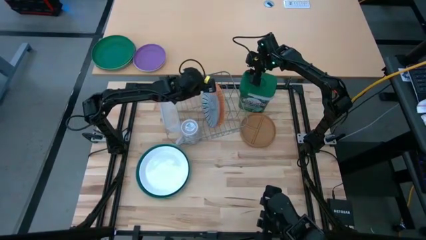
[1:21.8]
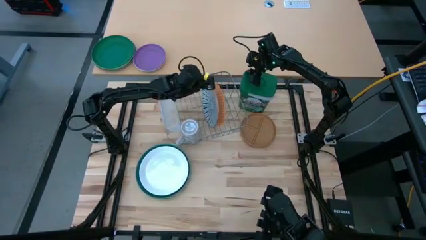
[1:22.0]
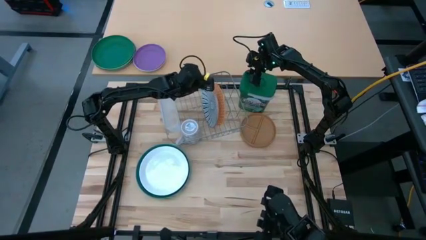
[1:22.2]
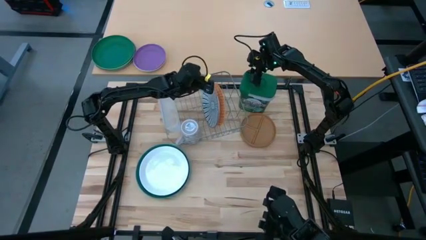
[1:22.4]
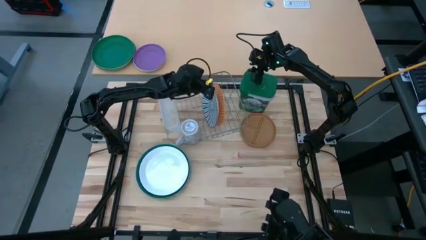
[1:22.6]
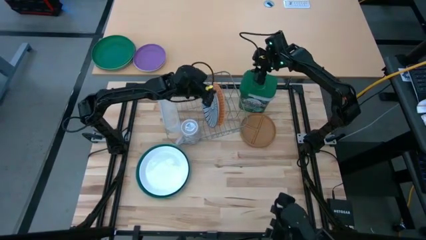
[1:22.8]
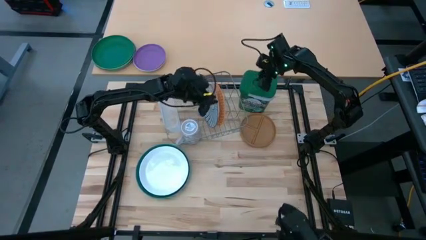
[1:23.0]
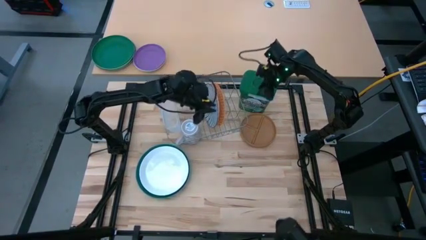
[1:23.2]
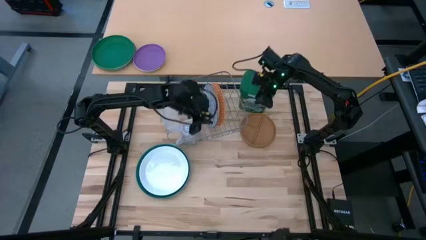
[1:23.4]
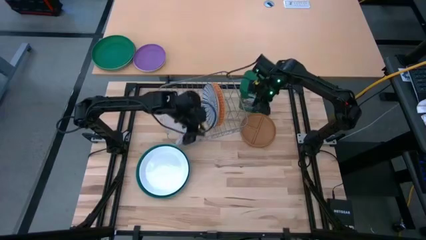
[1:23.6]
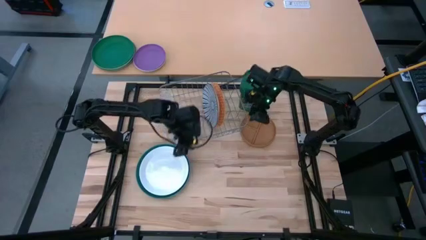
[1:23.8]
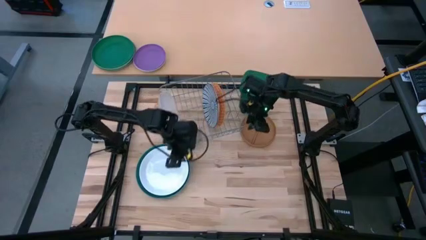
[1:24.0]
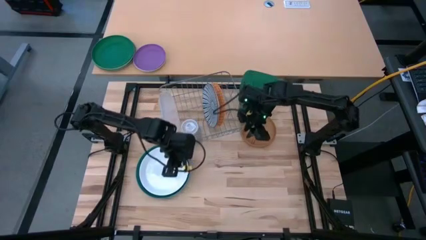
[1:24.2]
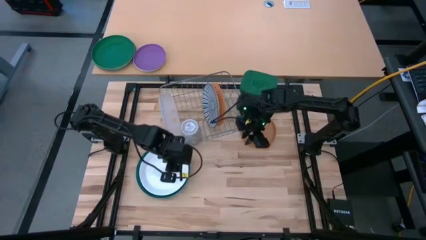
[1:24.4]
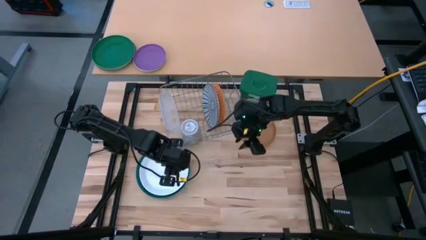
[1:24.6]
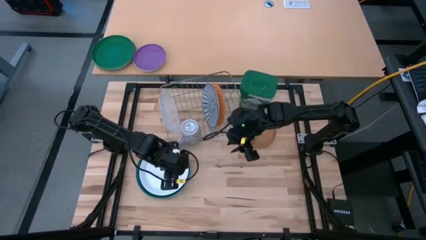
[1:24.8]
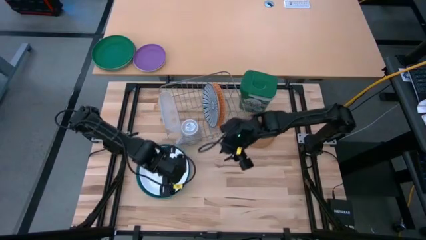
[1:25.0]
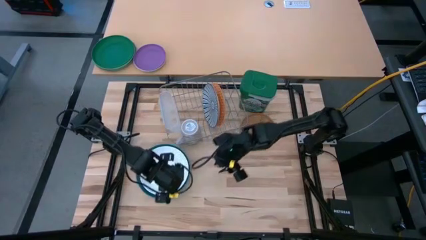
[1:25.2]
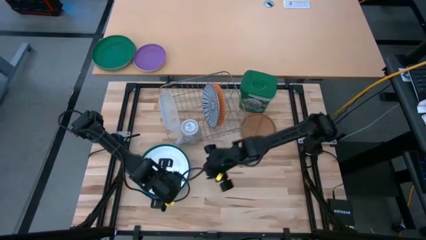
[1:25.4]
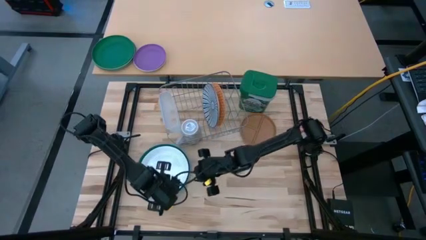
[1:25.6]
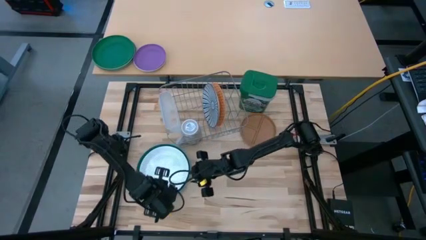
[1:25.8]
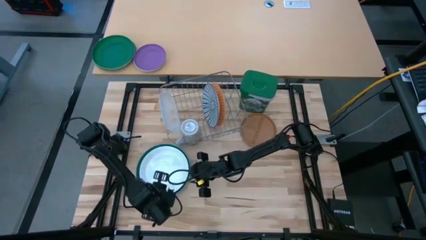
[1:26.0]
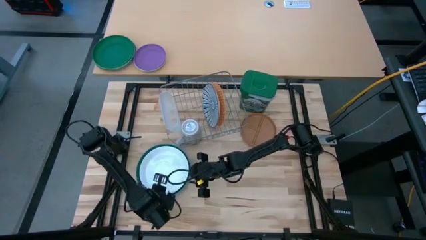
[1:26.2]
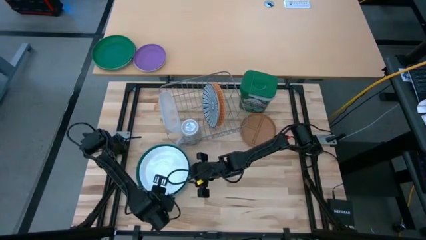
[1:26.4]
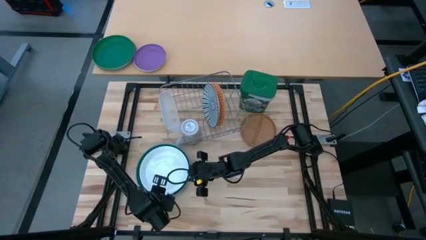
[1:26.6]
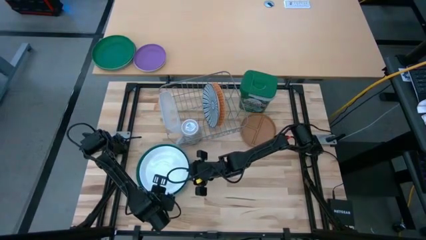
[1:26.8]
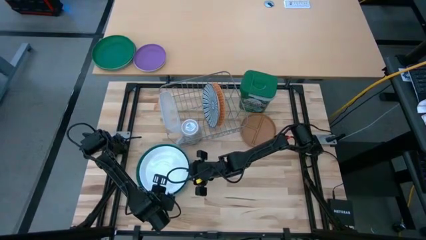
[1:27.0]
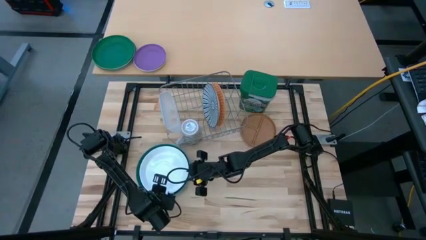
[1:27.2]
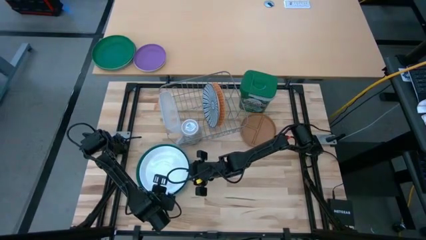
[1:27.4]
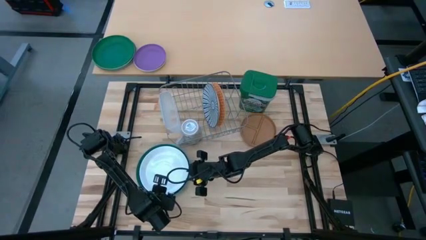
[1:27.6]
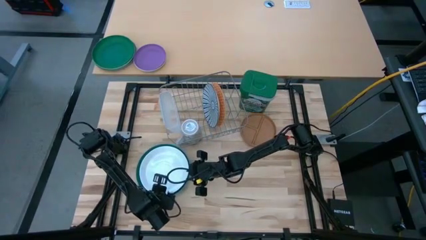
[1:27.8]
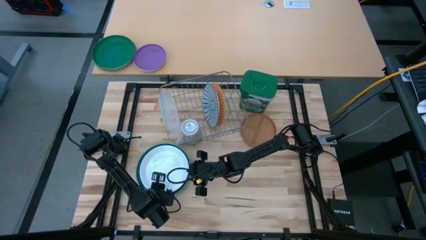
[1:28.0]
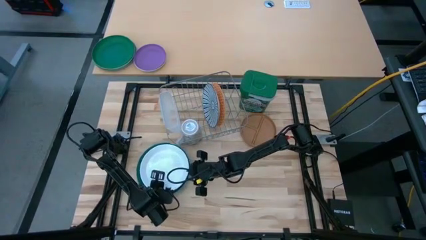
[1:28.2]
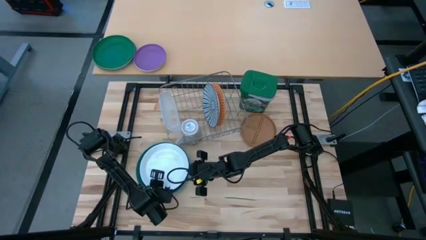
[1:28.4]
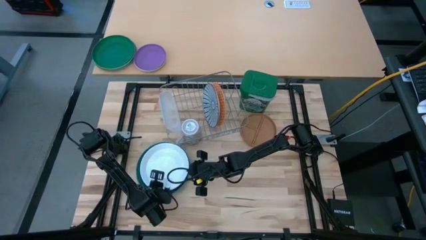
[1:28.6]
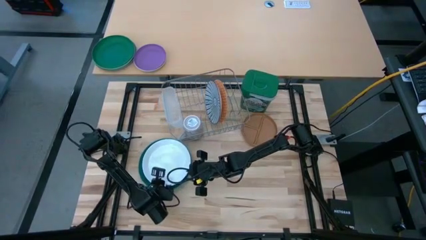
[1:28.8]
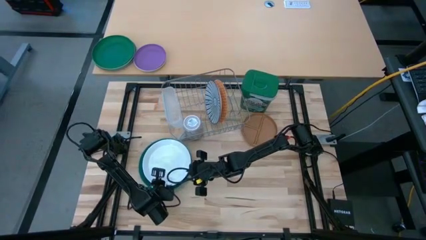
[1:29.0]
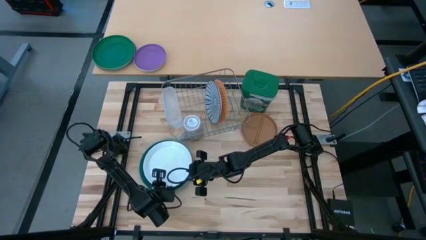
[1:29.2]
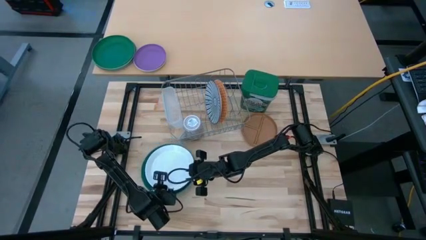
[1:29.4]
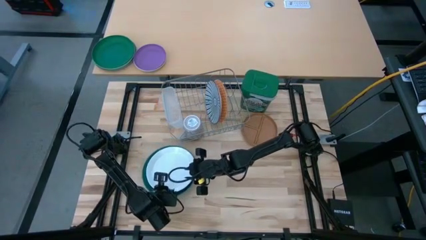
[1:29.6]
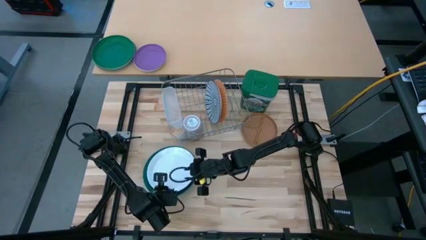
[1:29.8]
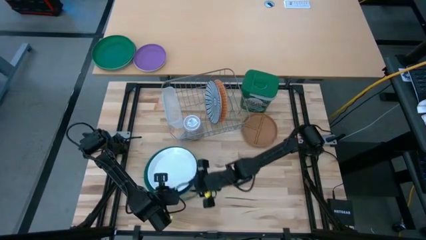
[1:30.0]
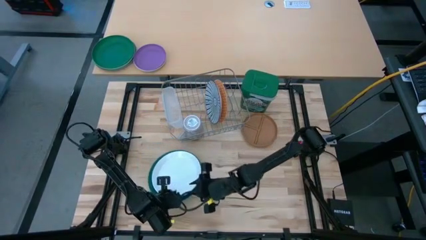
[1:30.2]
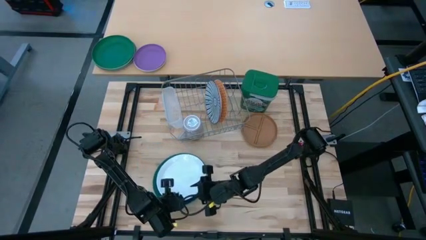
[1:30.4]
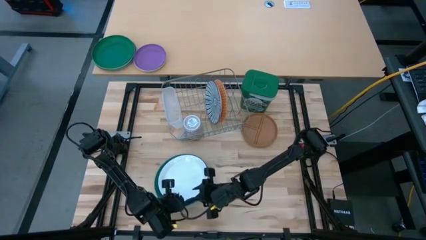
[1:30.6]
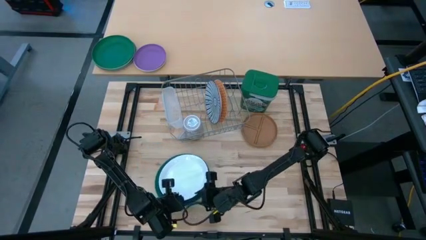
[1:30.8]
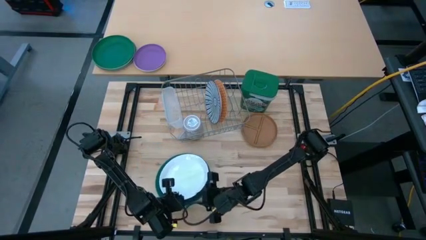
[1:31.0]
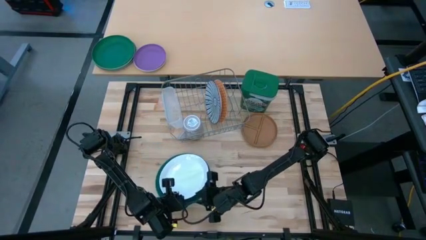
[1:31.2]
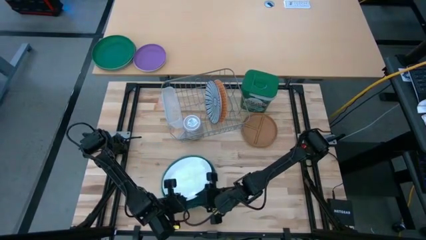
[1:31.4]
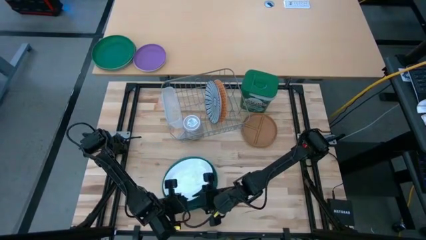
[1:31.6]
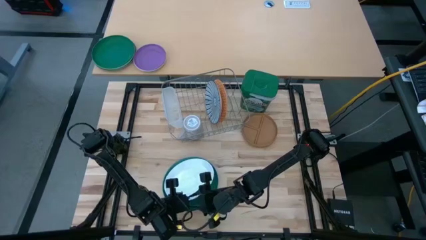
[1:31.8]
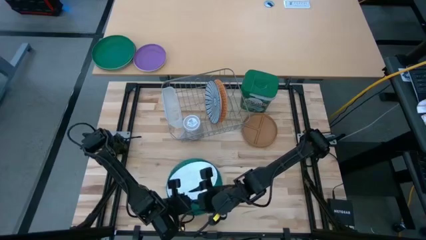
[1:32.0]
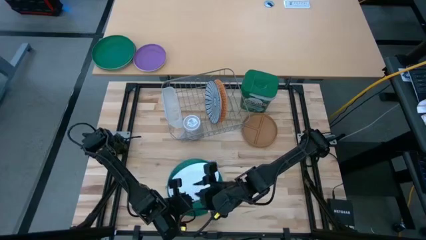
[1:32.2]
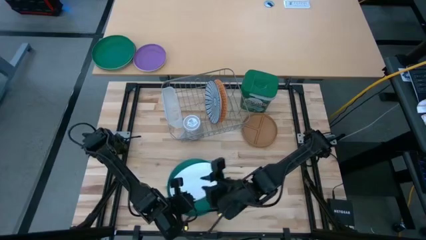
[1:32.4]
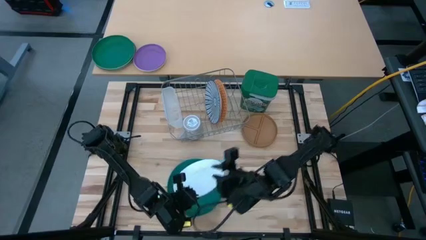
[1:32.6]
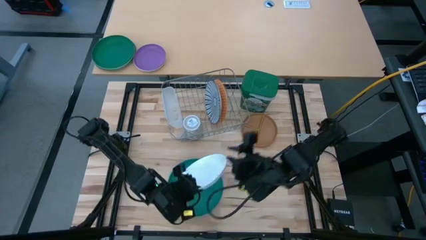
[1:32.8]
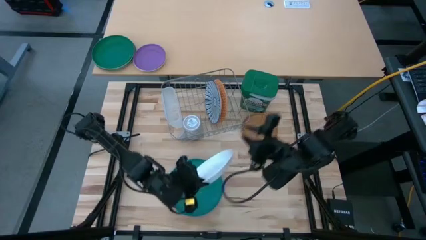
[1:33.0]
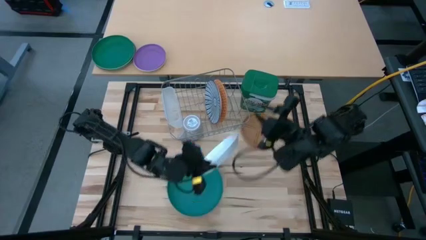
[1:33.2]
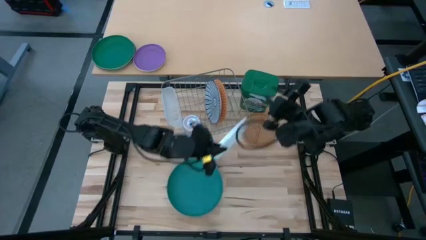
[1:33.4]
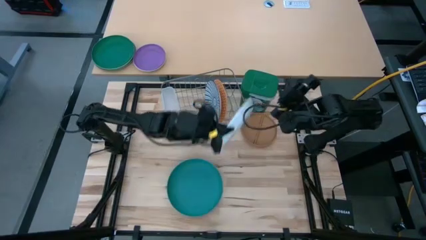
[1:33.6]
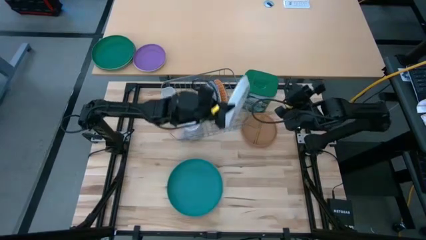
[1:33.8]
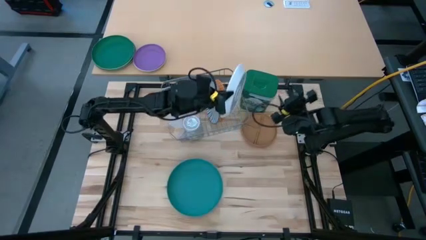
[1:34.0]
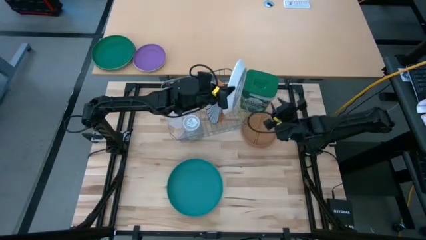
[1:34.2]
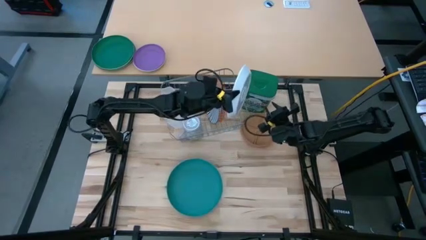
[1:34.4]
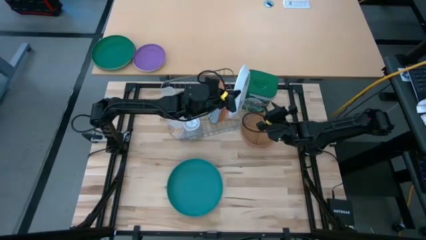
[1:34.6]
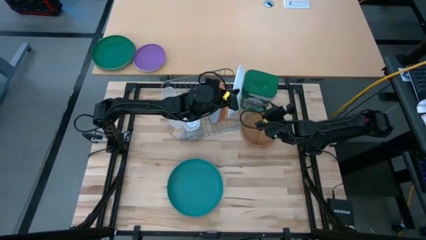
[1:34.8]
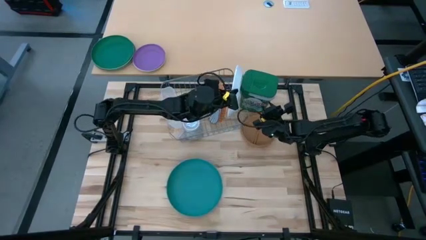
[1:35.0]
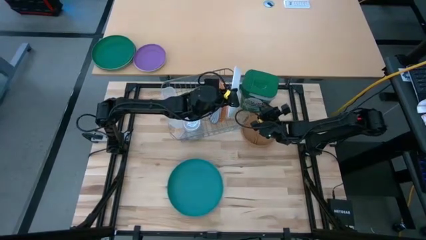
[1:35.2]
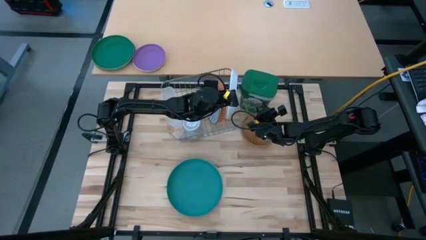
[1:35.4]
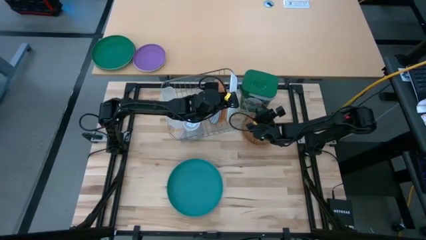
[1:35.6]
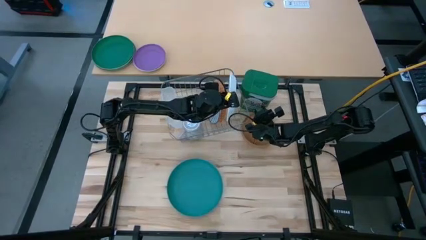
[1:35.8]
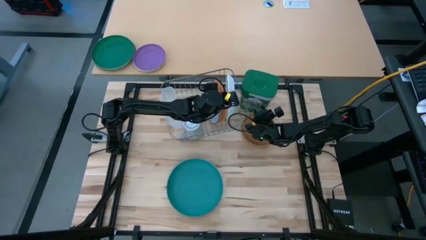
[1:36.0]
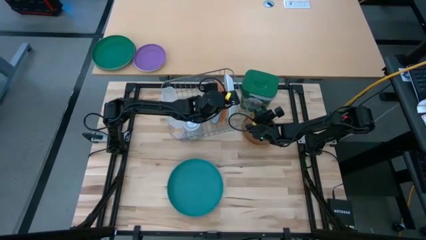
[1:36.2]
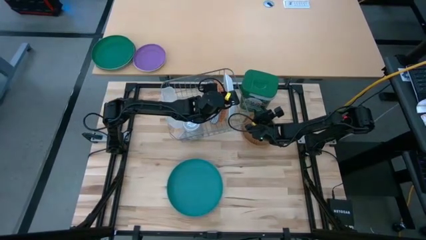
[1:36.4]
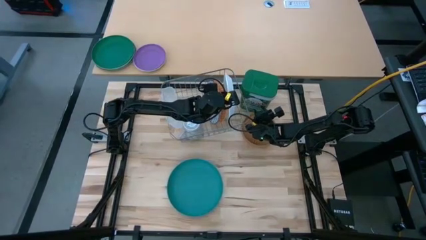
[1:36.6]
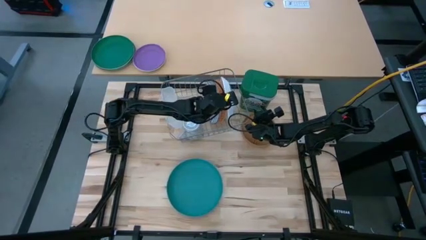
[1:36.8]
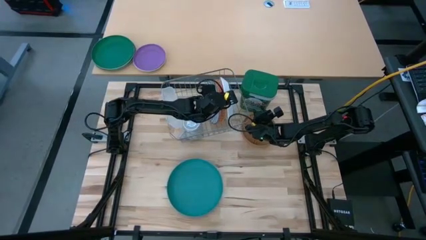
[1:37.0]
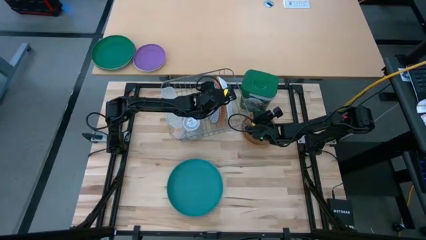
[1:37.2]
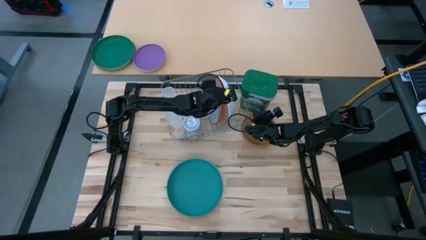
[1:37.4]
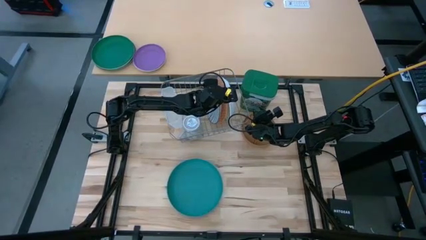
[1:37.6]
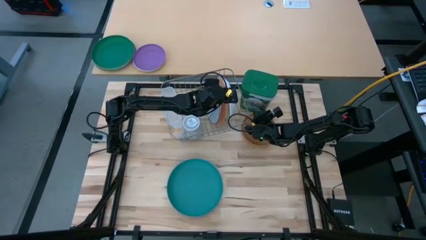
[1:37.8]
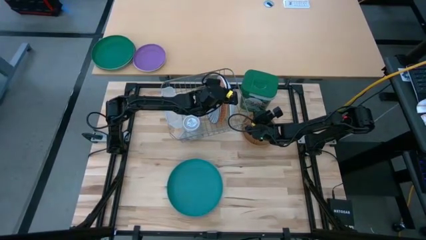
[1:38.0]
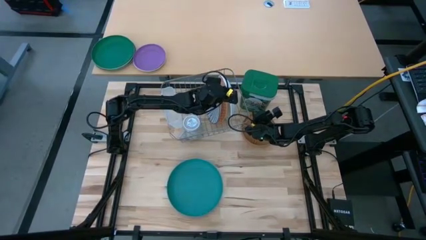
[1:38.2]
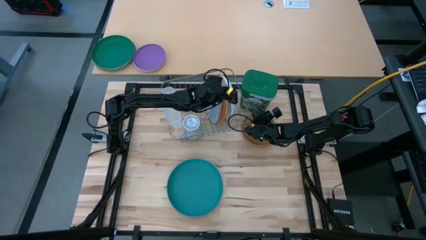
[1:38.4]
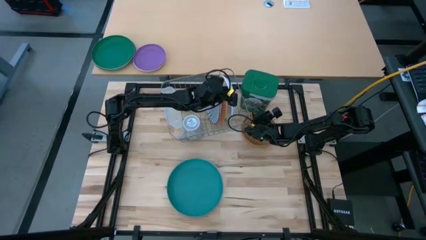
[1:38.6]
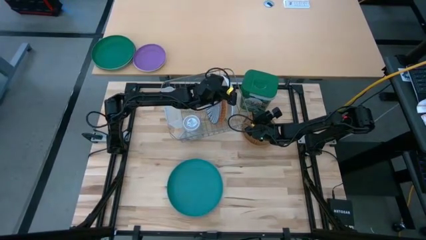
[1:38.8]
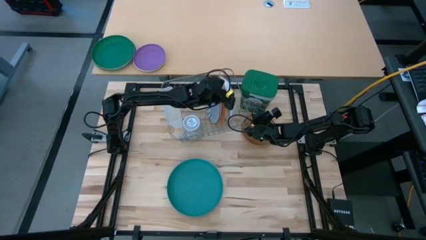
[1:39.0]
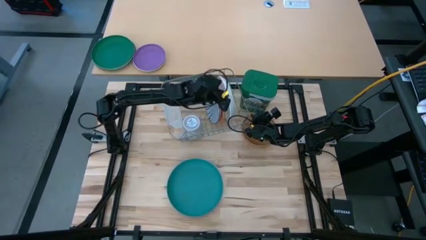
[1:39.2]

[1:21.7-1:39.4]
Task: Sort dishes
Put the white plate in the dish rack
